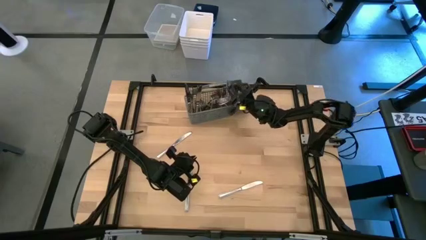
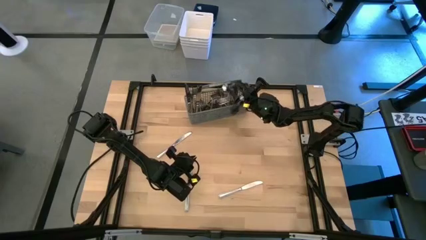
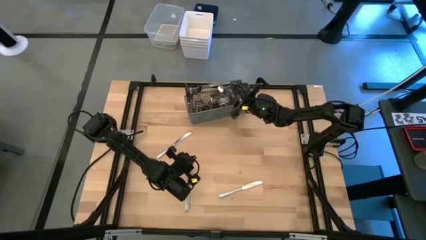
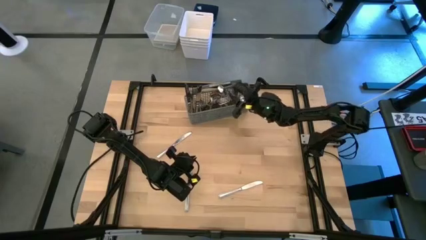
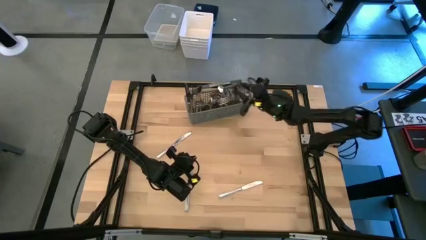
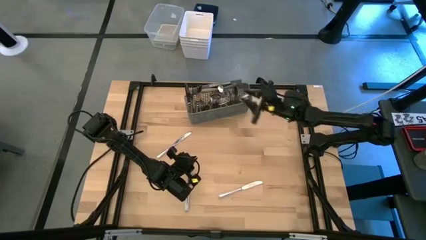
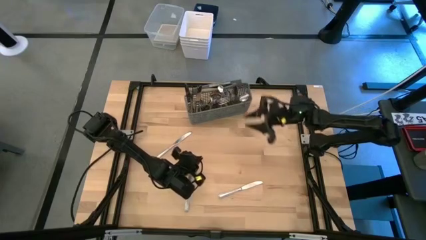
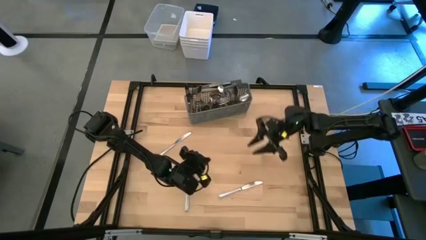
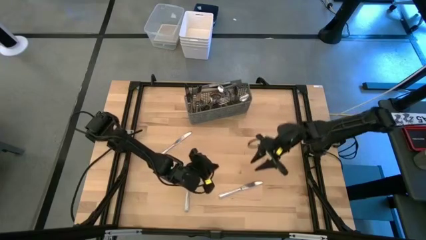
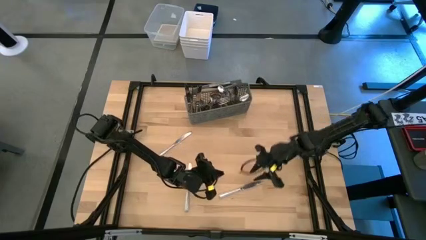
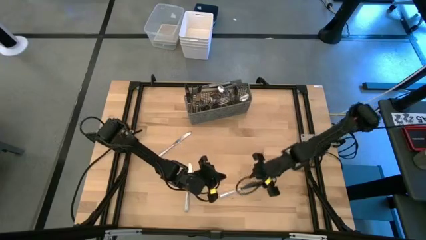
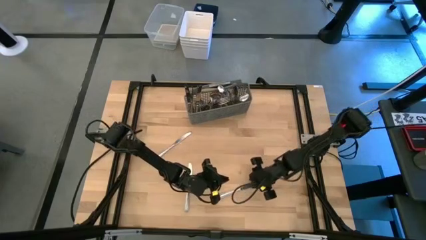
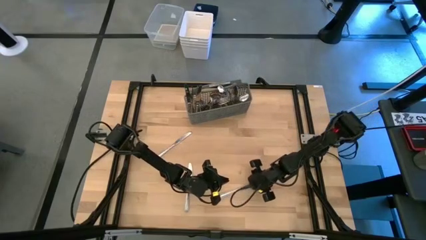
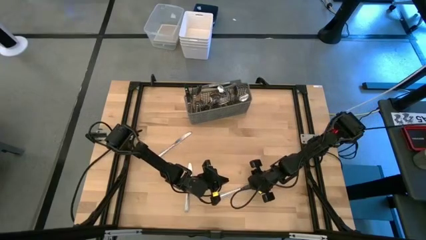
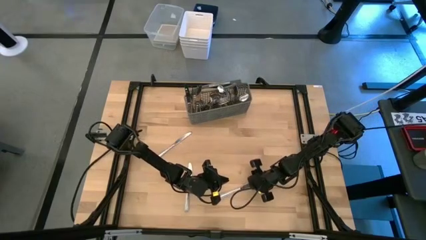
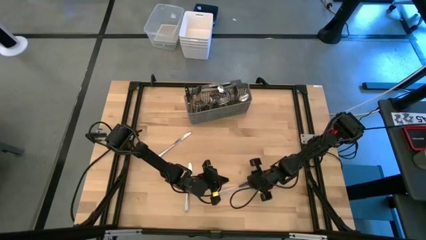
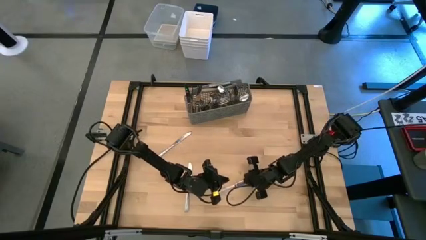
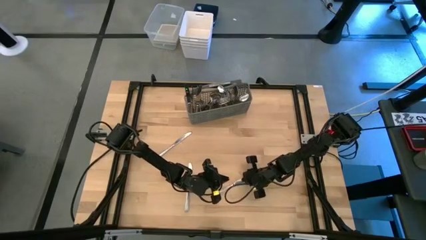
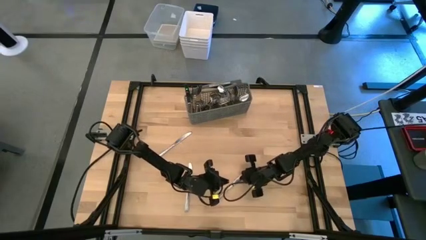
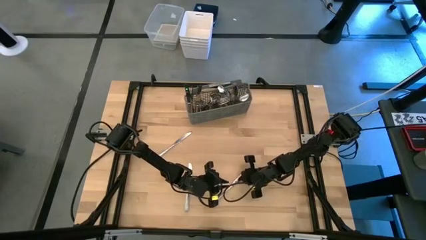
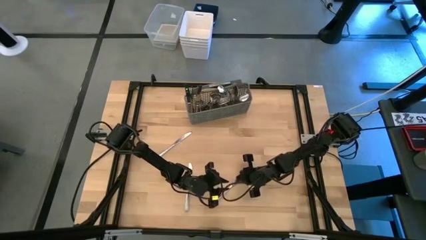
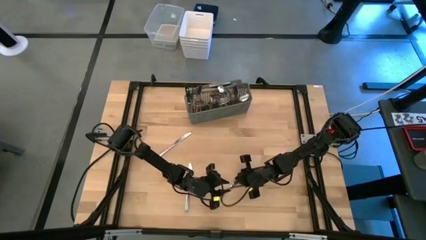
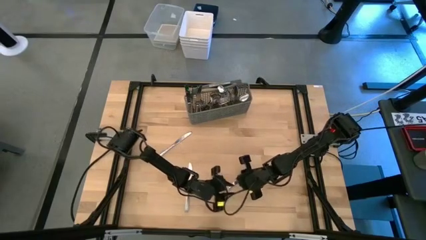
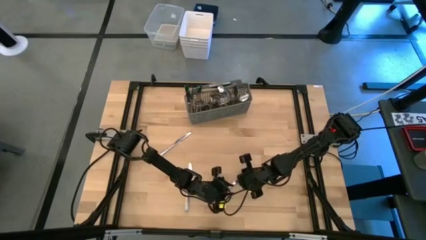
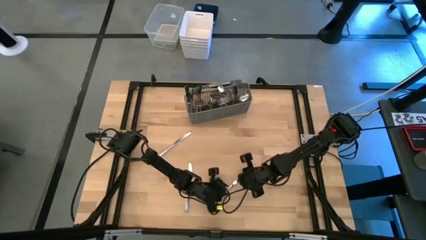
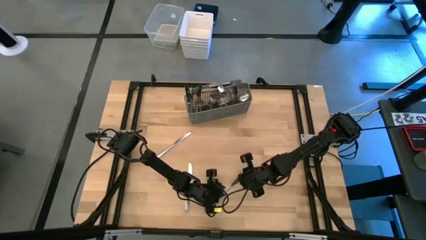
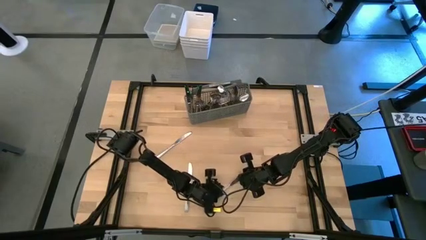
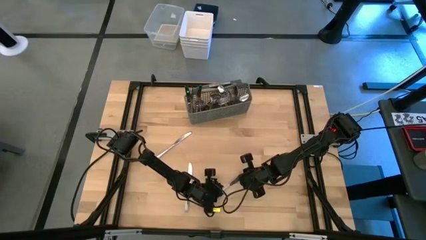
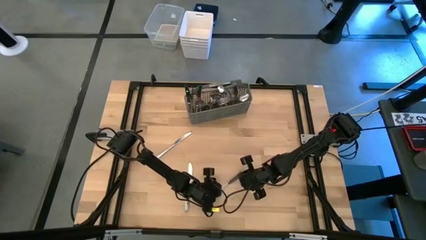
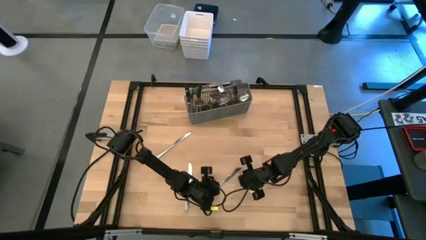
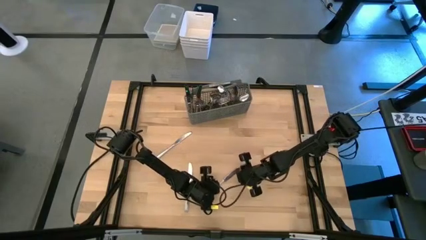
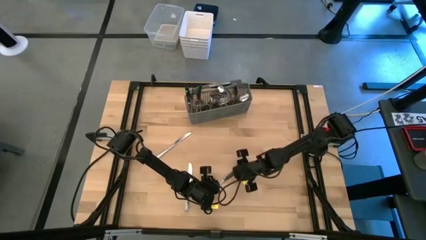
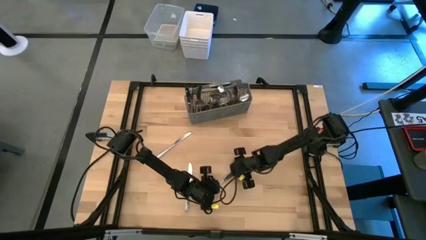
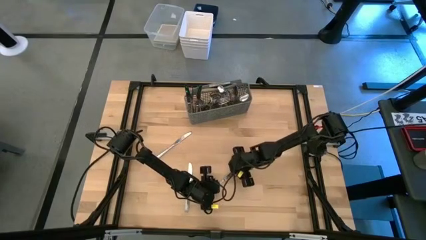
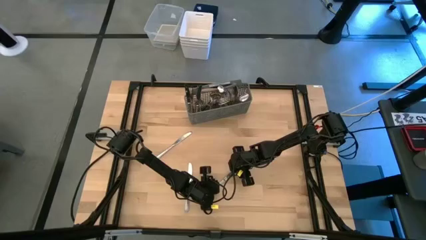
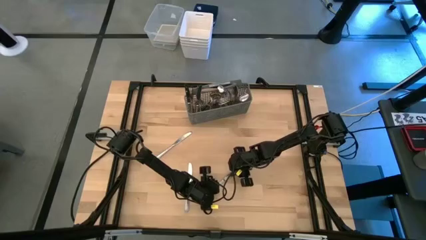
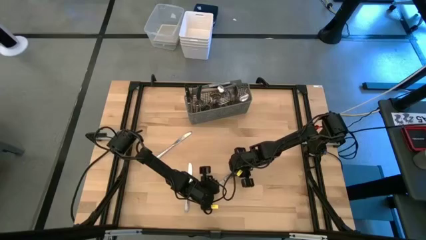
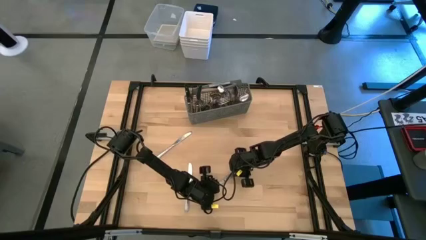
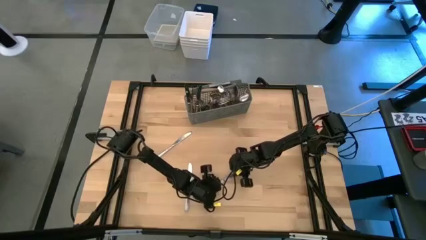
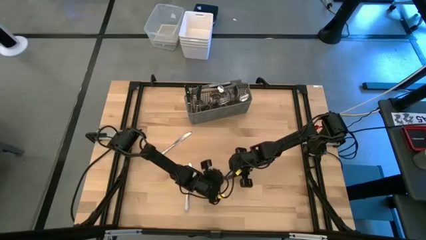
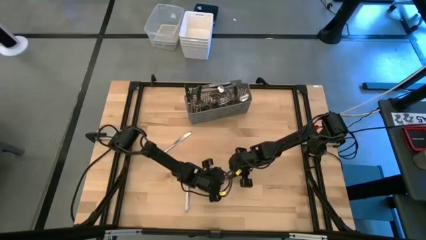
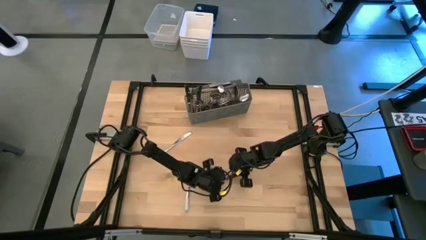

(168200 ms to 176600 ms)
Task: Sort silverware
Put the silver table knife into the gray silverware organizer

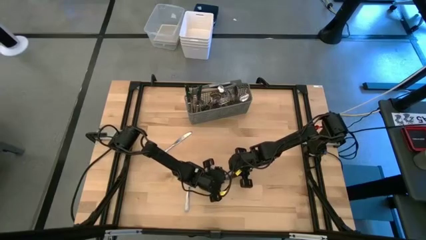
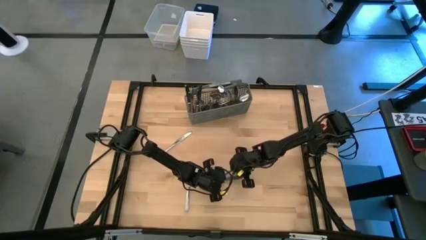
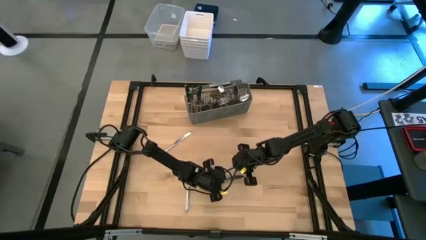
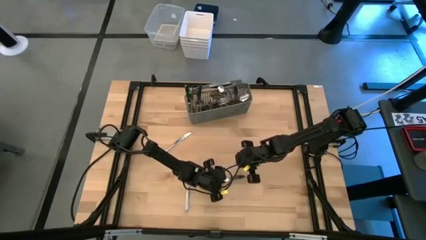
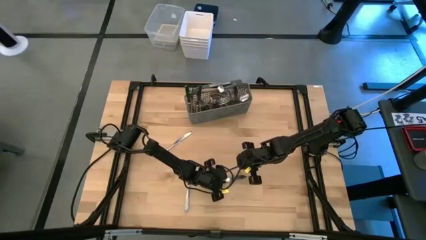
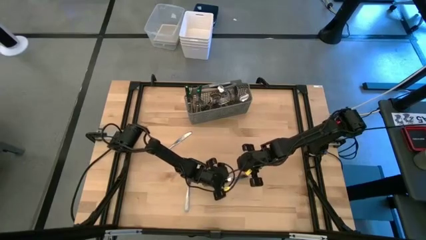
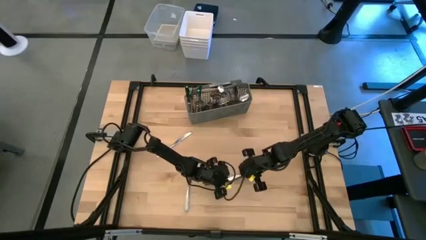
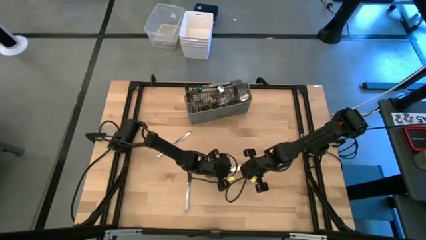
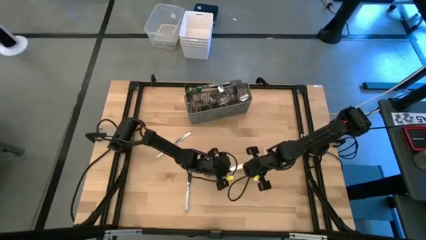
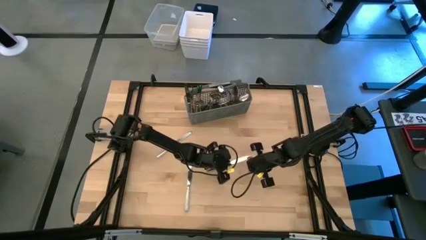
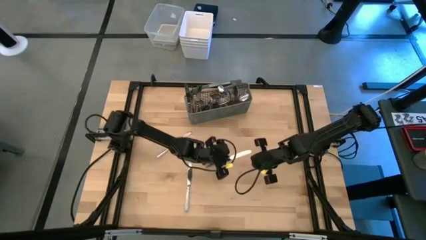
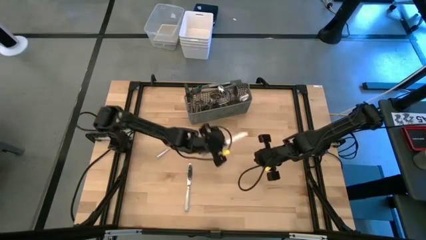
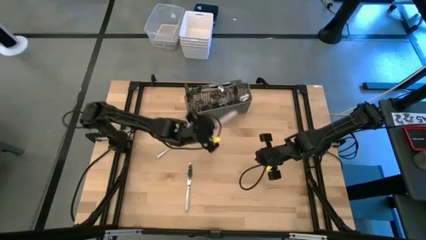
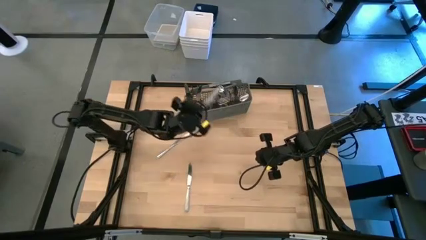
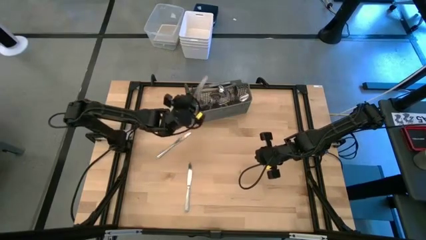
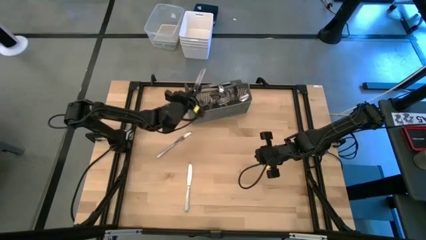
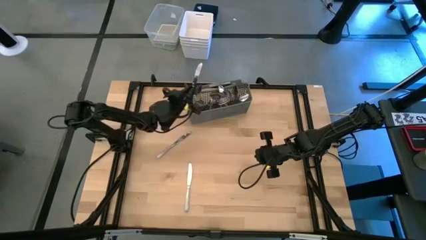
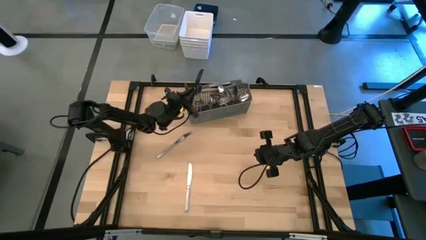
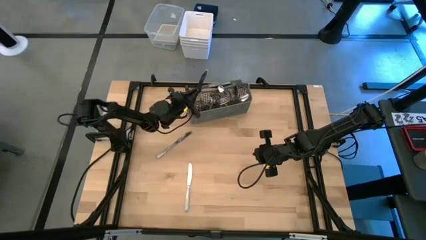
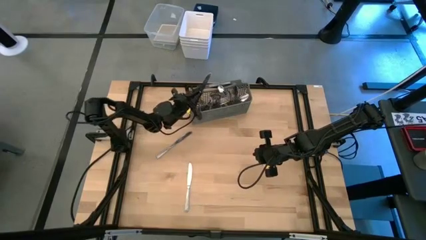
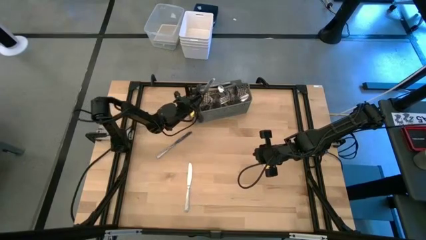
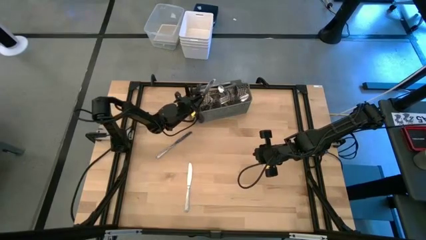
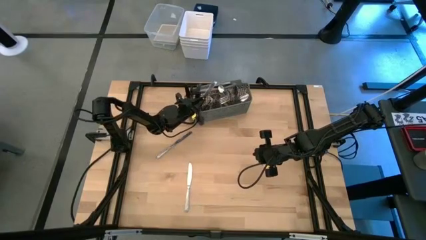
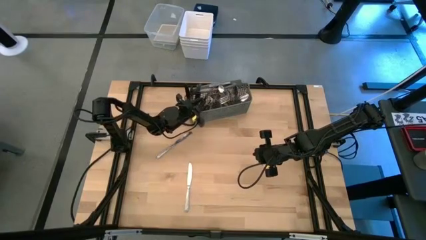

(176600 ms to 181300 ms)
Put the silver table knife into the gray silverware organizer

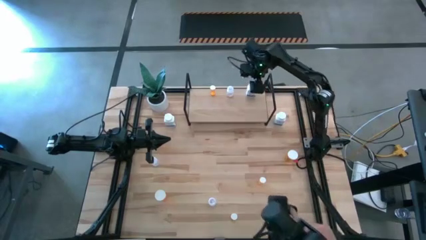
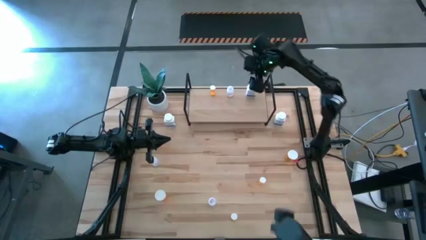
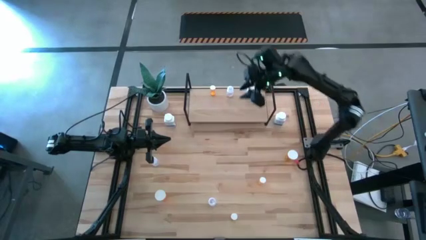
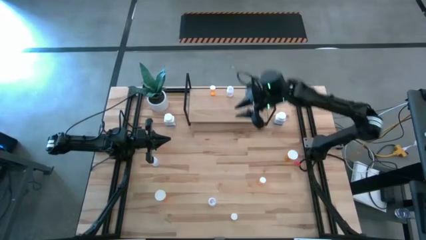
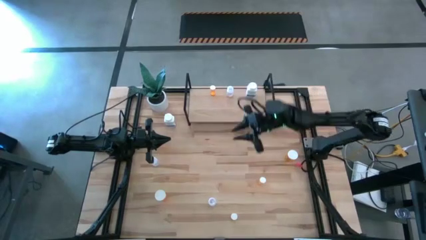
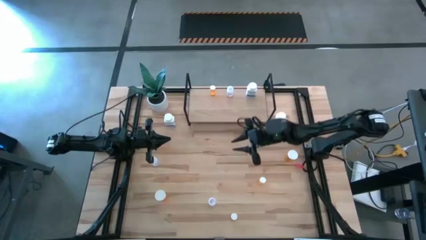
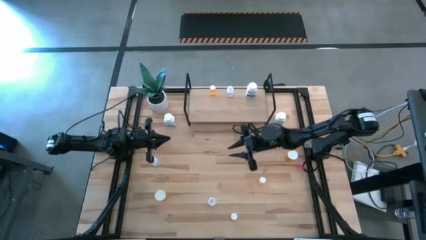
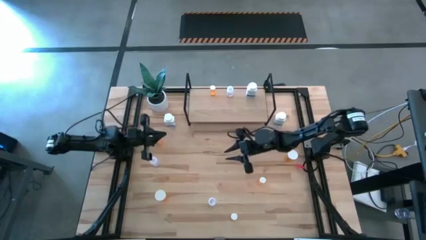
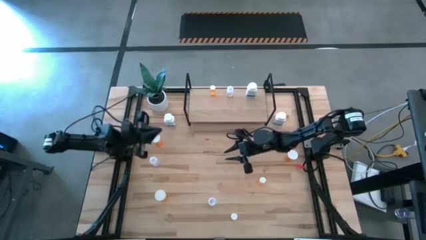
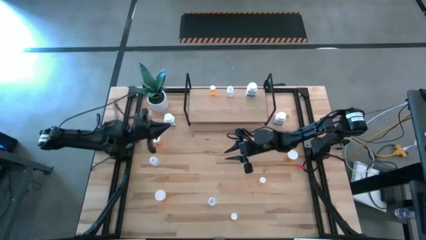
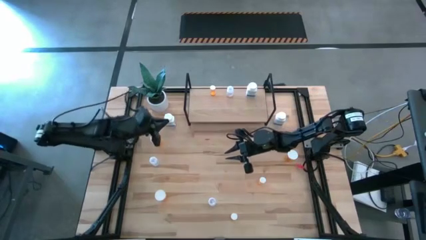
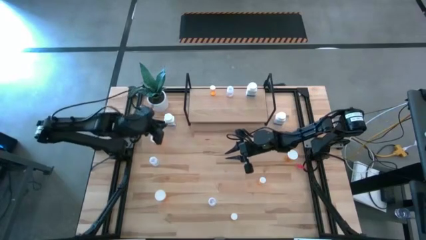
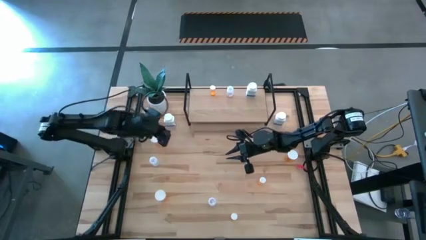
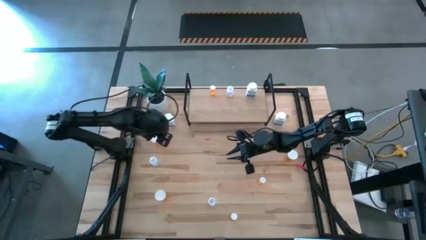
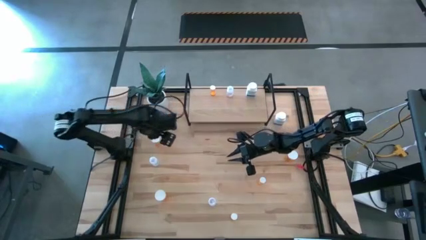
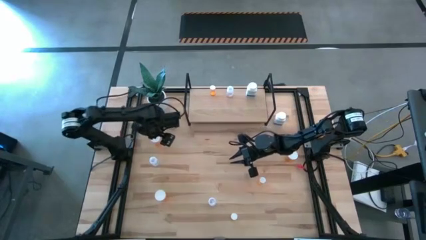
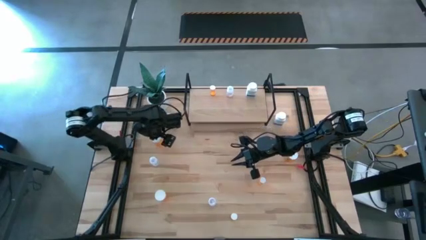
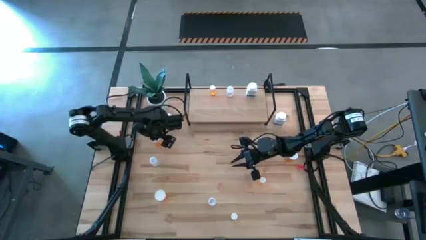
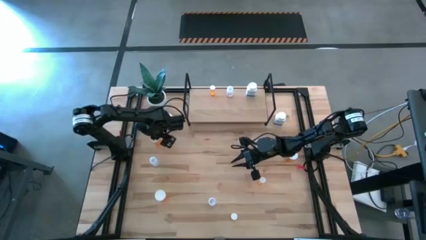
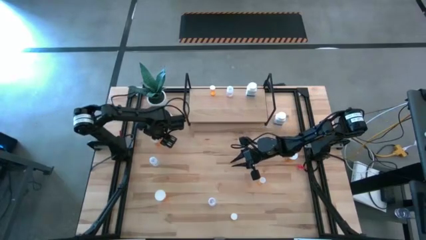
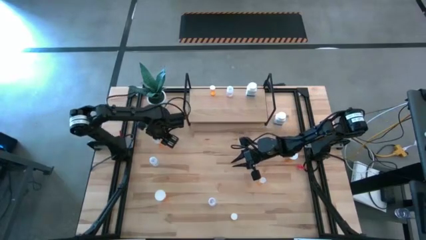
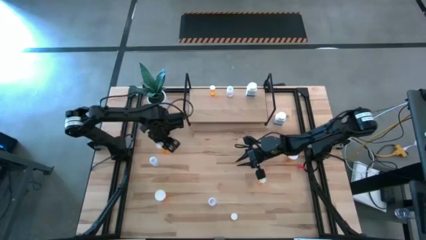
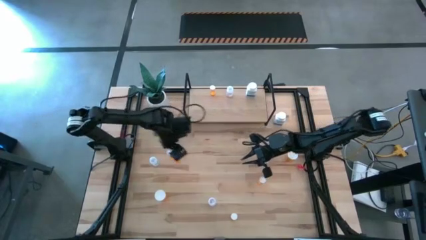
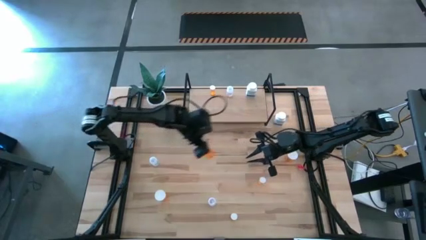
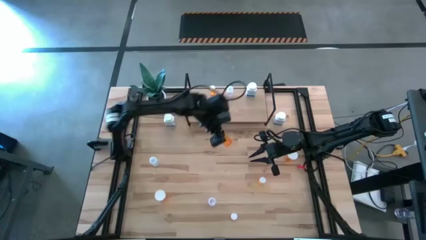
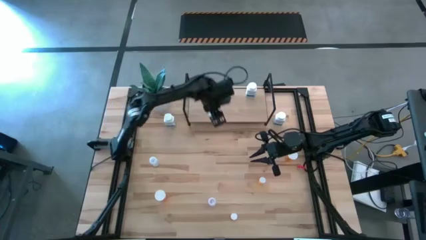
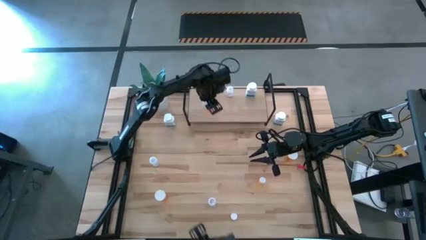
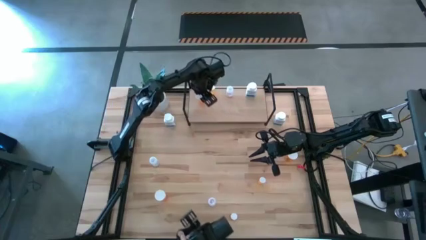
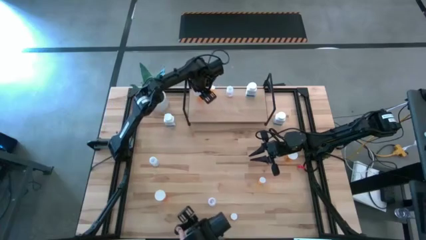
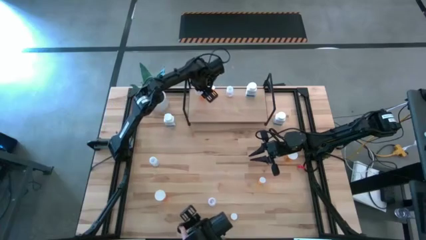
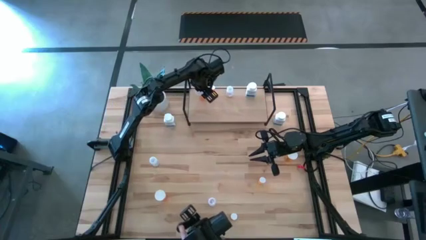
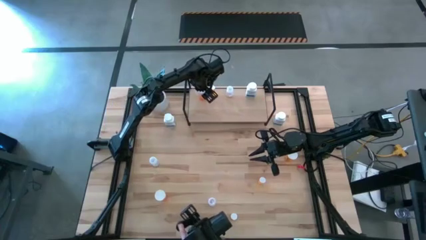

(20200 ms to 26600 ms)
Task: Pick and place medicine bottles onto shelf by color
Put the top left large orange pill bottle on the shelf
